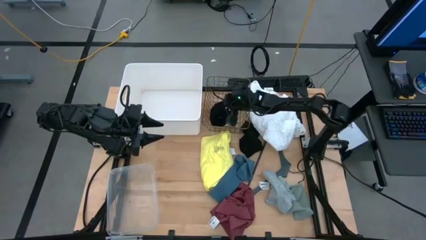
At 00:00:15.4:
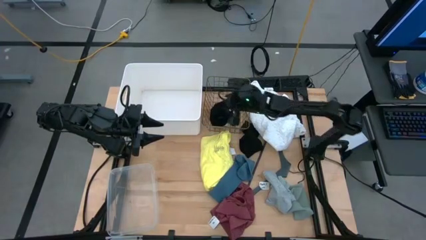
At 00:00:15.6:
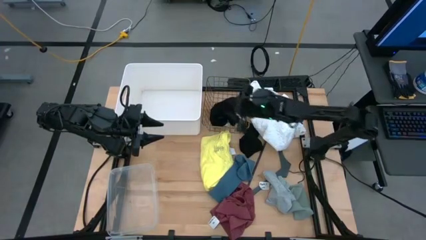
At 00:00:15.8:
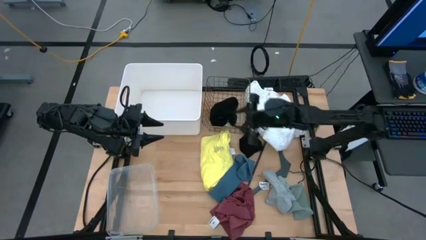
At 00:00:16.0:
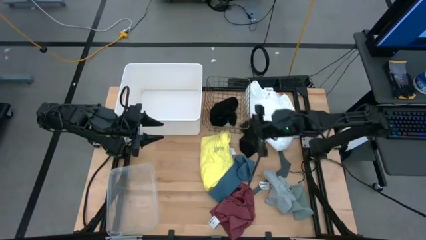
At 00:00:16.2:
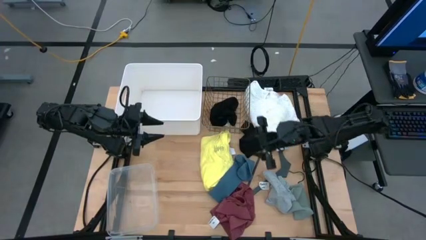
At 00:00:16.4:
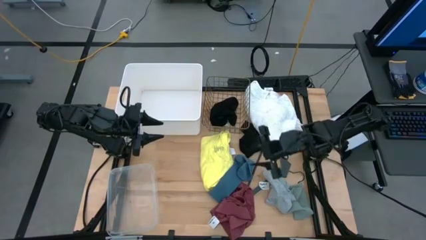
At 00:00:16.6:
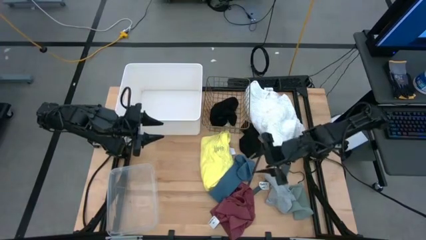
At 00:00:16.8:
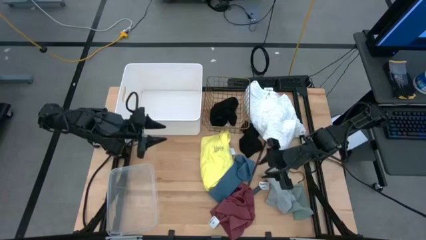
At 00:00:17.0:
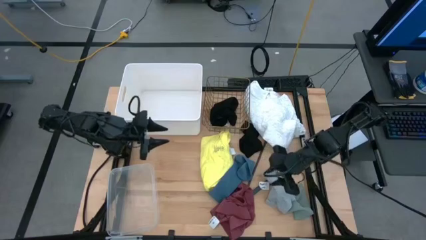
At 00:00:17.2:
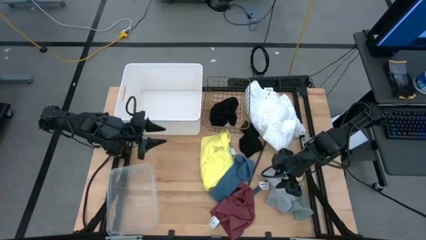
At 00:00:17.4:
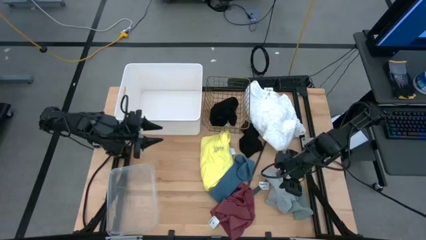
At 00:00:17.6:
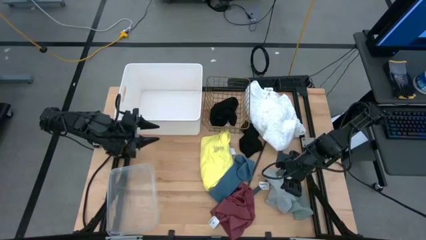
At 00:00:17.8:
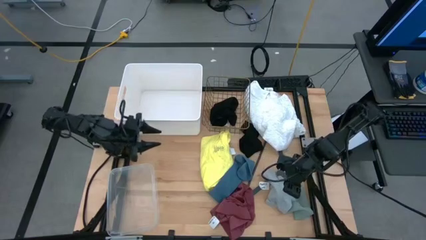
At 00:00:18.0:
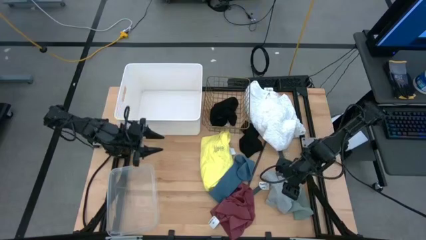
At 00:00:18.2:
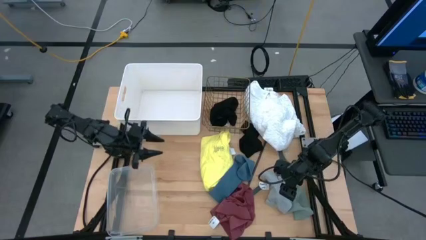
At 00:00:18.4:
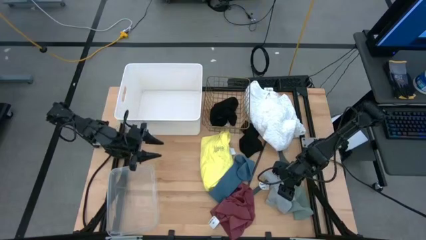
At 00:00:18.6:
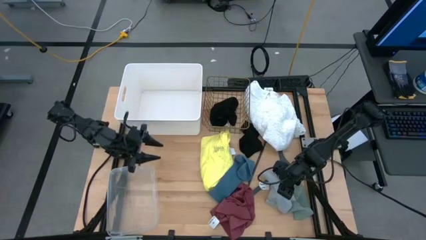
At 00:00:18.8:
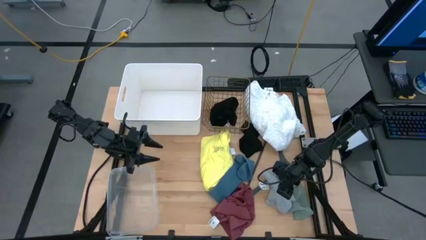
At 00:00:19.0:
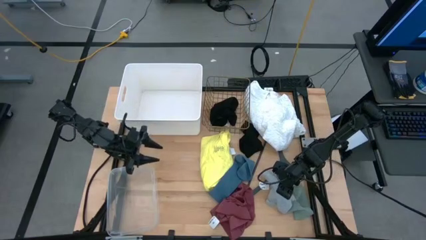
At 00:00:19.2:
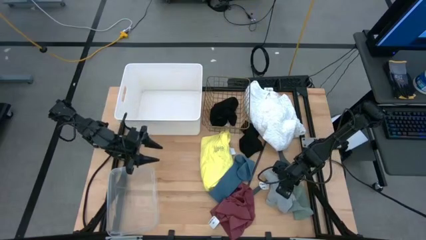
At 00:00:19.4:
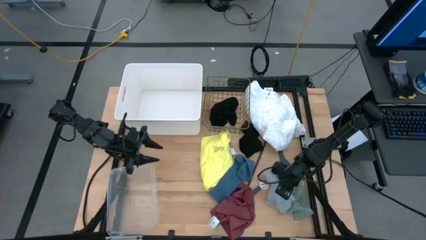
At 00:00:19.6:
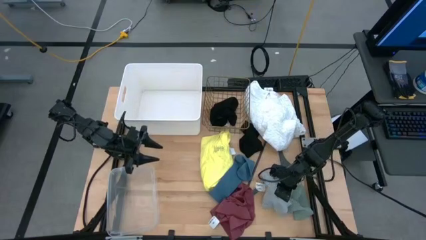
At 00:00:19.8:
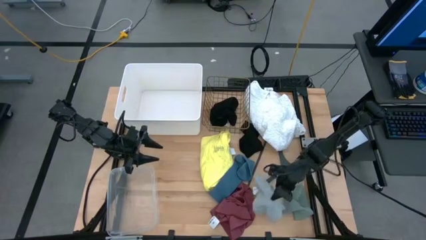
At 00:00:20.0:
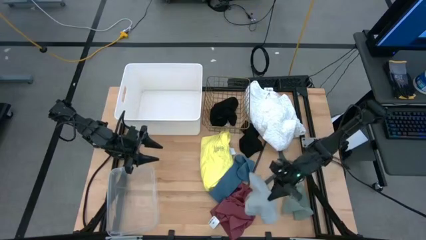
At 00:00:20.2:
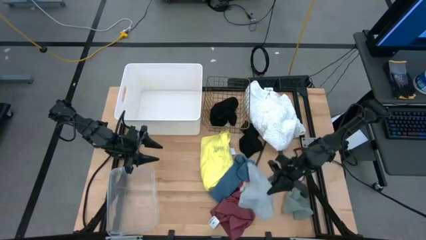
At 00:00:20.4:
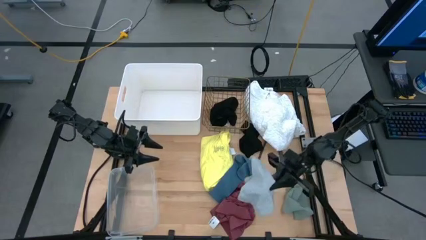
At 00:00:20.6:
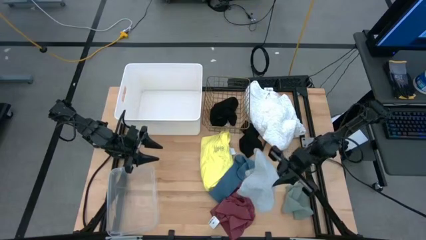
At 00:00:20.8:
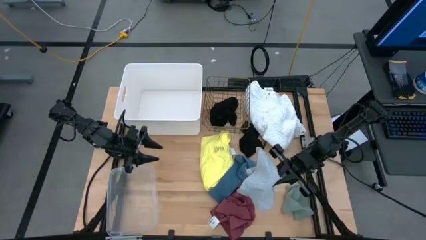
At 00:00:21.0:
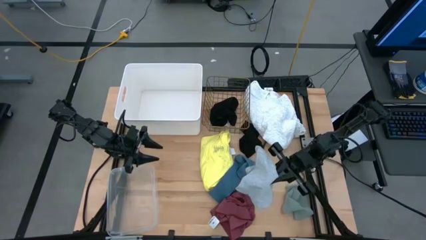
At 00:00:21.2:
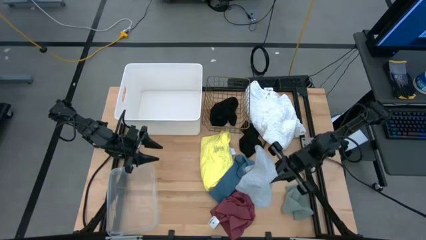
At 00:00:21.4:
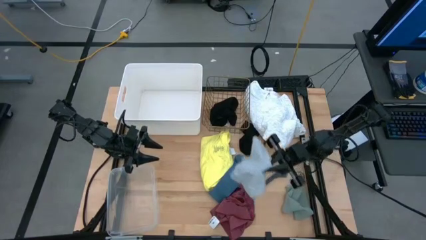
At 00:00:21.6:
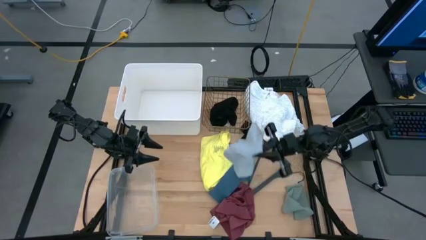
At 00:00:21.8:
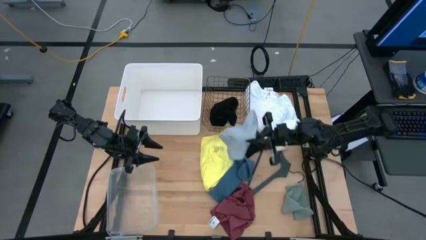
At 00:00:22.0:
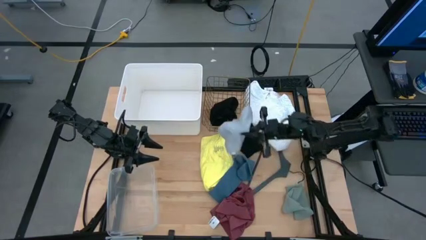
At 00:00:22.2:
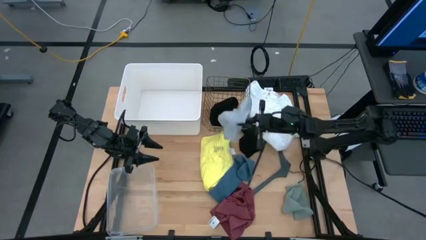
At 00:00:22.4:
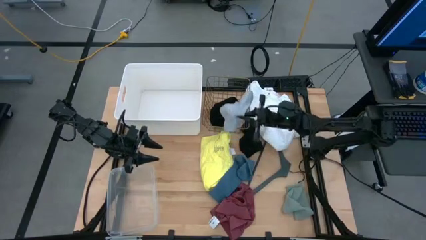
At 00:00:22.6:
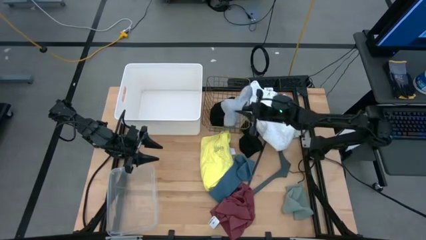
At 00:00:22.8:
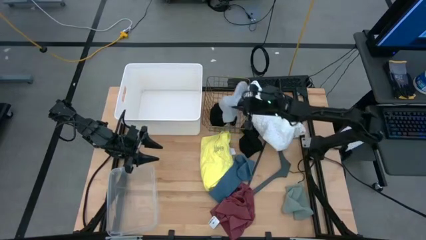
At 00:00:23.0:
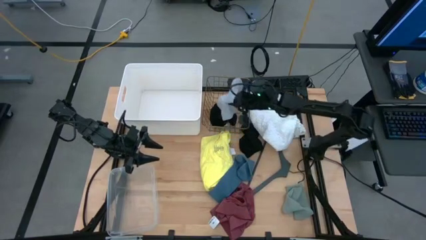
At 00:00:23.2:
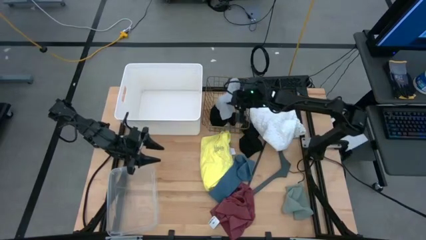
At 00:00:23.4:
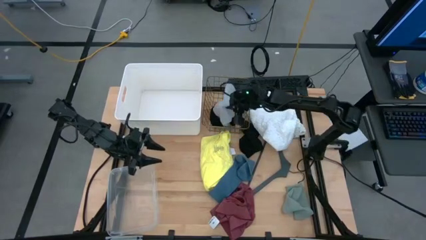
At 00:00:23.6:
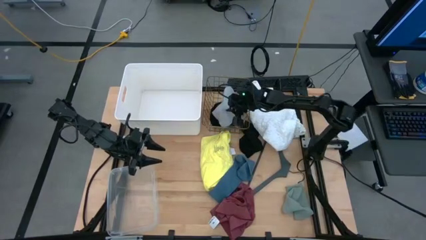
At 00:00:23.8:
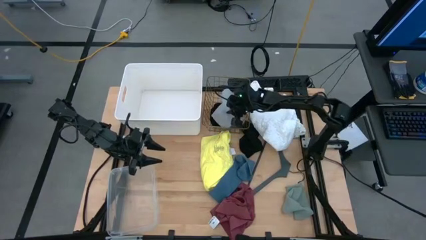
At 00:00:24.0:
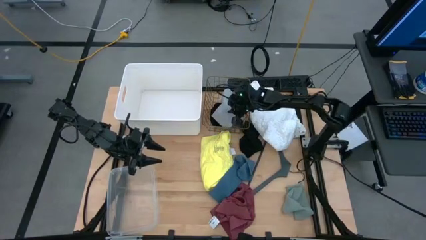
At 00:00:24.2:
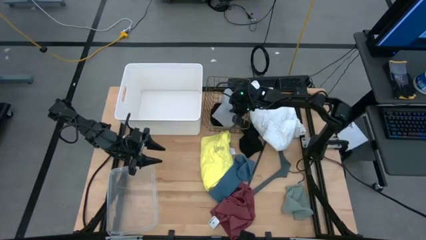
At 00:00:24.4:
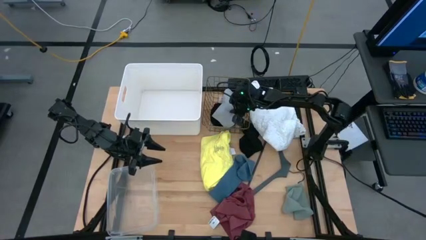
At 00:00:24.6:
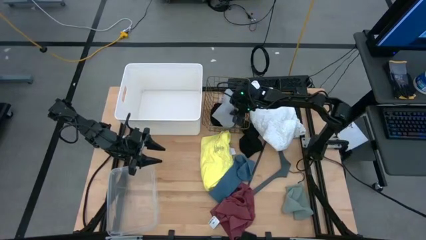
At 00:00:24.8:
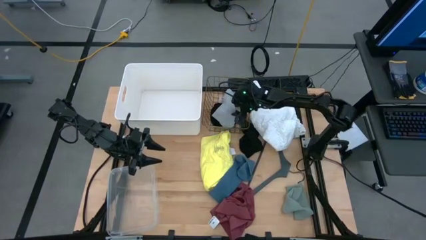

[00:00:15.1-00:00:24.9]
Task: Pick & Place Cloths
Put the gray boxers into the wire basket

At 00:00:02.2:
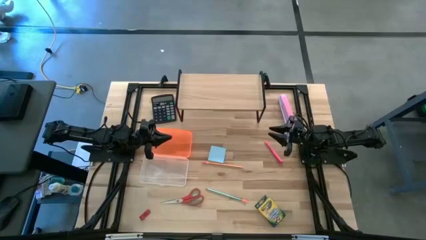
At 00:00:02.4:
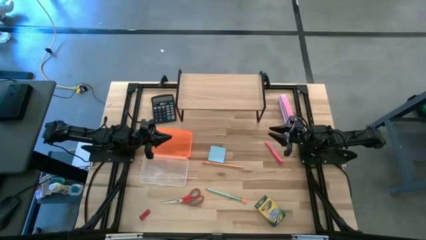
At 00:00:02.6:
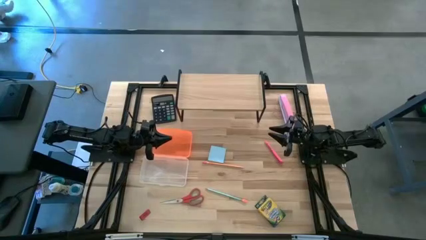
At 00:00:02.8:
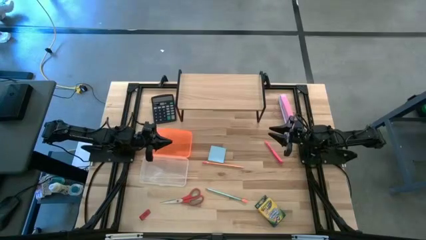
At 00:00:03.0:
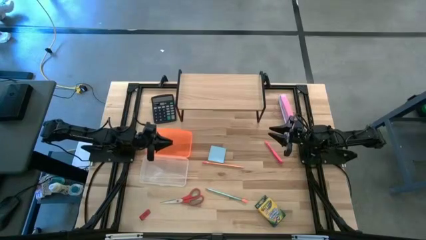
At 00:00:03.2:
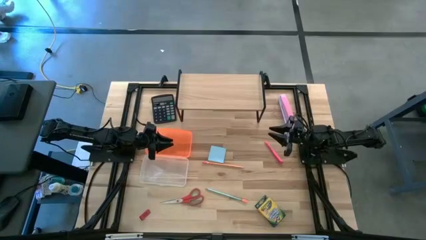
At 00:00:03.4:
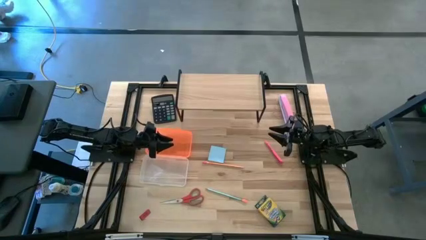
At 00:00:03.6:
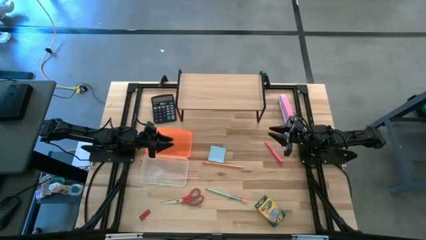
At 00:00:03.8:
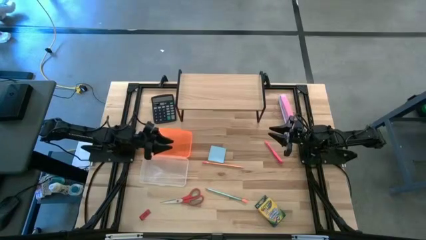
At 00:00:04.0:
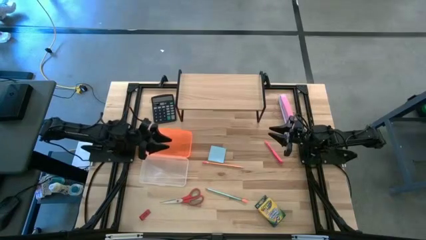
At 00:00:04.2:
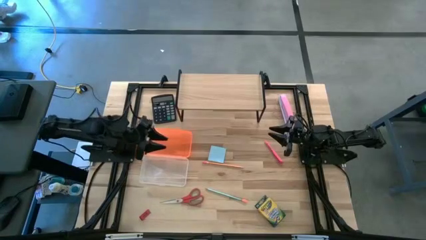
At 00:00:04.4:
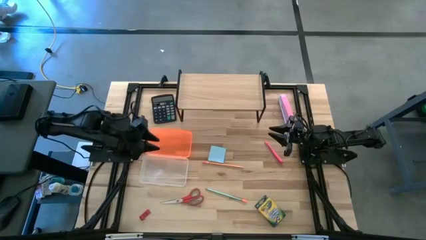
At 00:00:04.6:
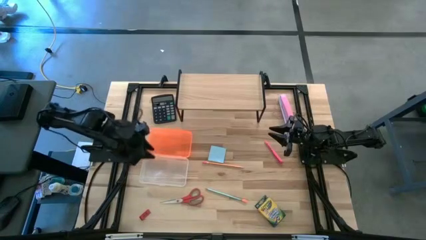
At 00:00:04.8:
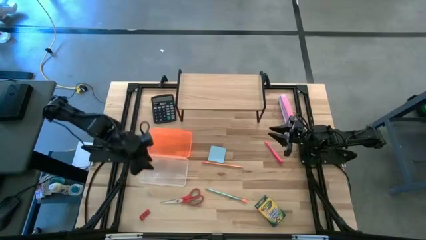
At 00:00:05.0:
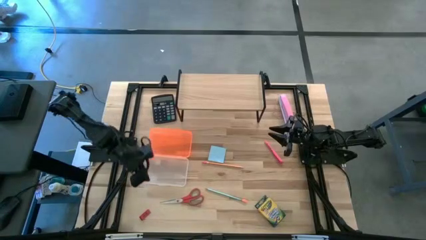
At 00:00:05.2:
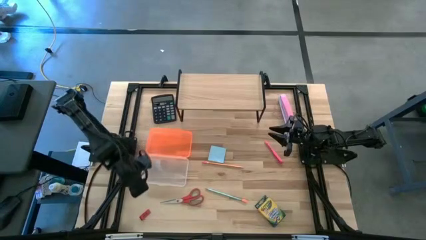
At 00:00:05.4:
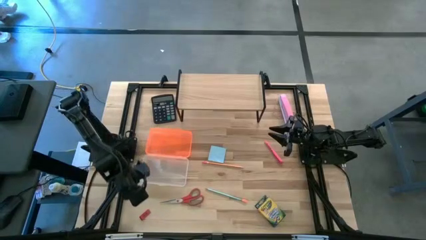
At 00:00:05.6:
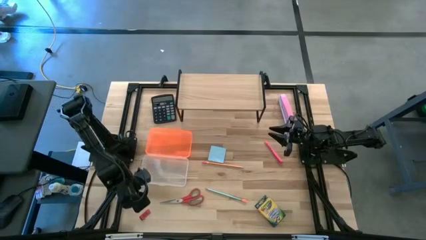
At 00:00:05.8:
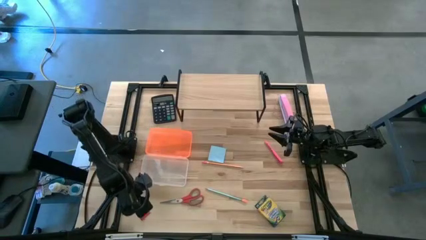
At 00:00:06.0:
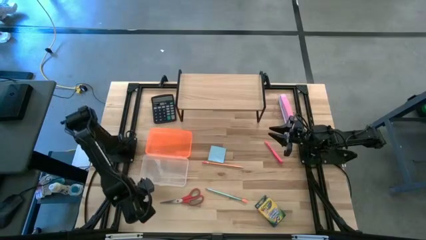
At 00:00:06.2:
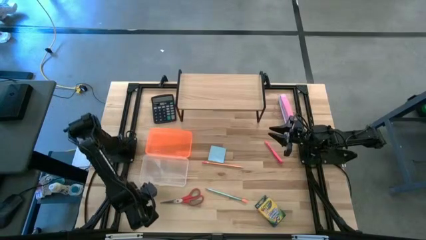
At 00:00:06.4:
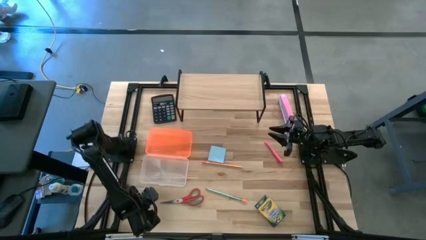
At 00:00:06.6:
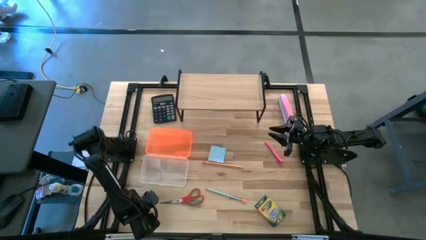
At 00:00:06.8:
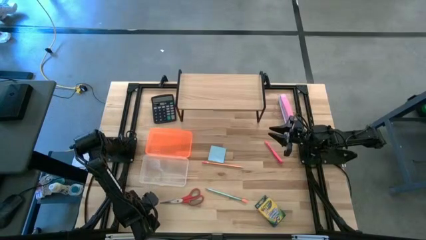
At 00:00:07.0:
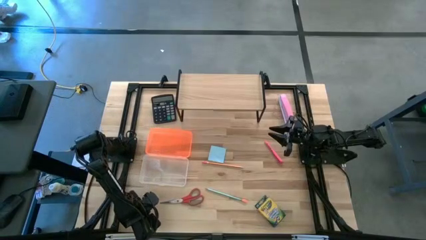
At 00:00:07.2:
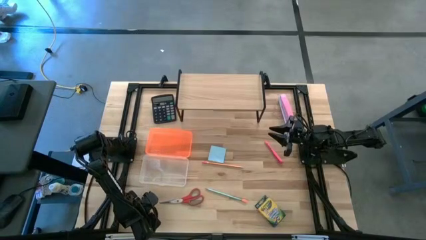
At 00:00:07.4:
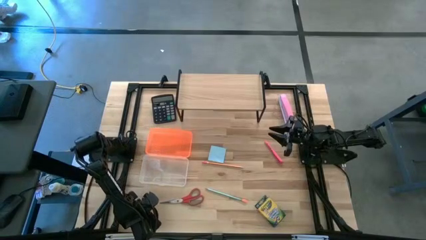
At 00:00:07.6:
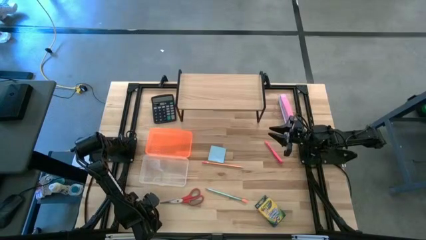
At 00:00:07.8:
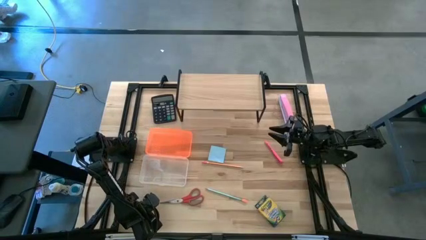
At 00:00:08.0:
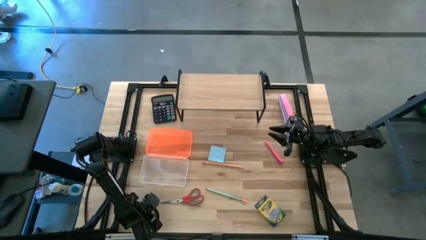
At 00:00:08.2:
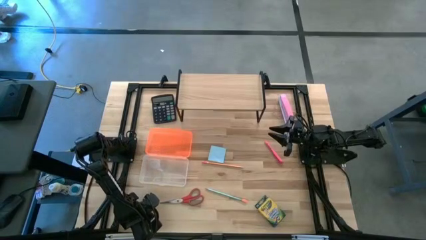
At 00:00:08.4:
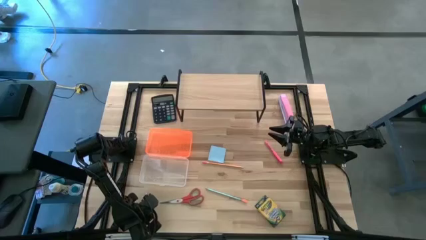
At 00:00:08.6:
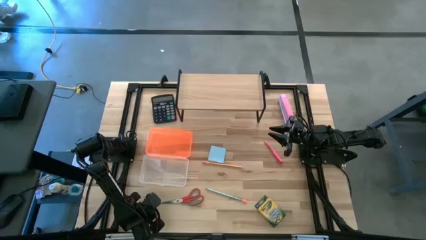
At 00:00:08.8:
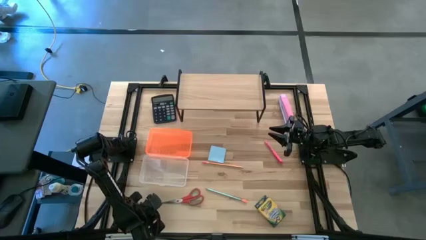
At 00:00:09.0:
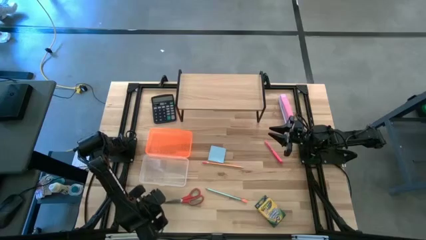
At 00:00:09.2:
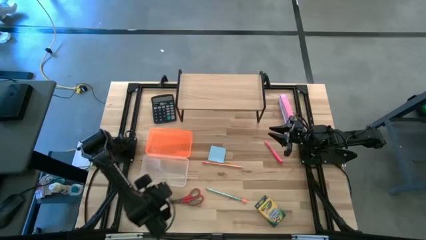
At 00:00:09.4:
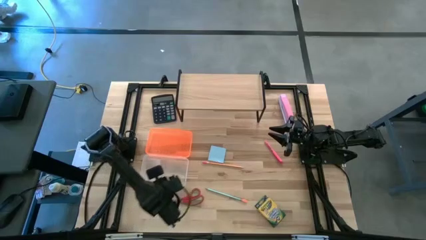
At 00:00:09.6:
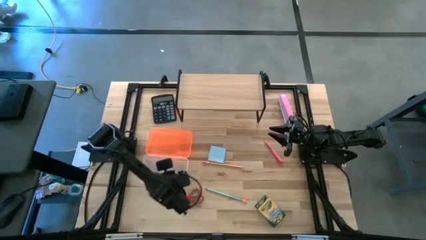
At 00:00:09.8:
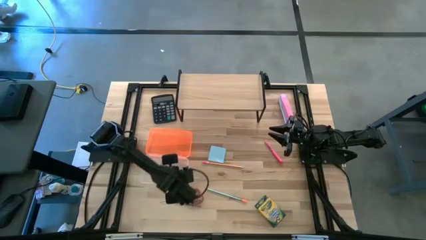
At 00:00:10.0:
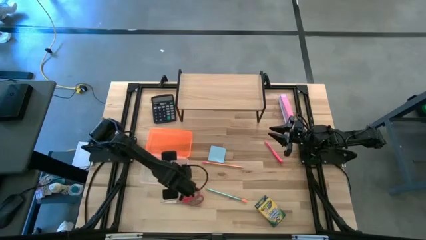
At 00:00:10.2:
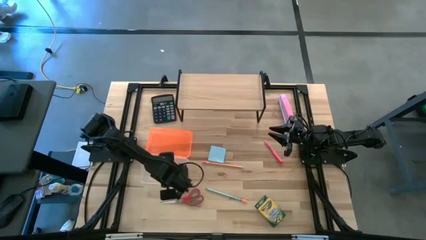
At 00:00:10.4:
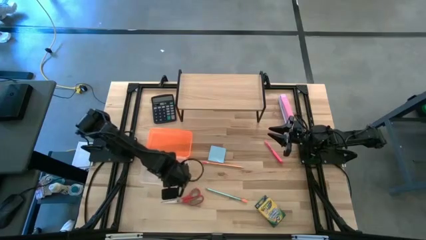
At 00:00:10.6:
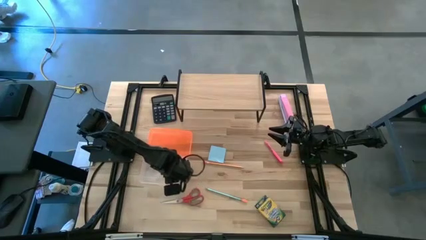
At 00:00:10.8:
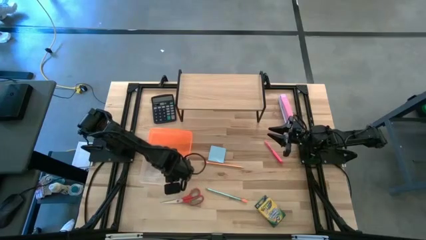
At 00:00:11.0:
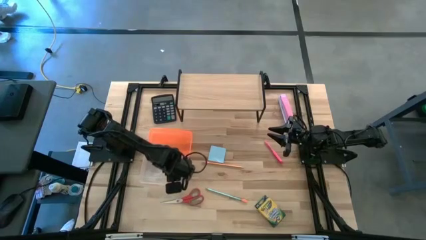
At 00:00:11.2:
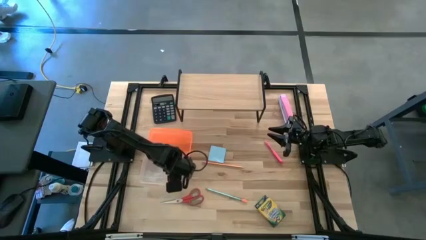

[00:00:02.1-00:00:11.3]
Task: Pack school essentials
Put the red eraser into the supply box
